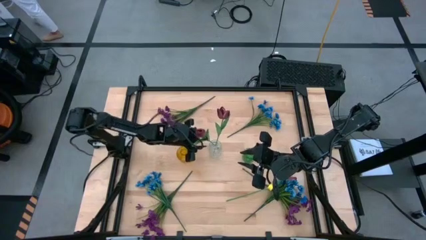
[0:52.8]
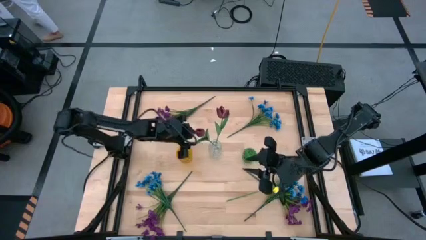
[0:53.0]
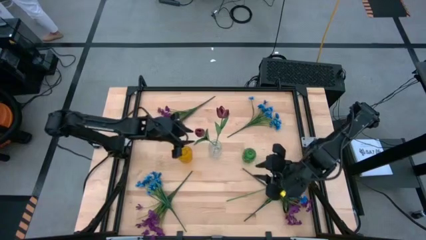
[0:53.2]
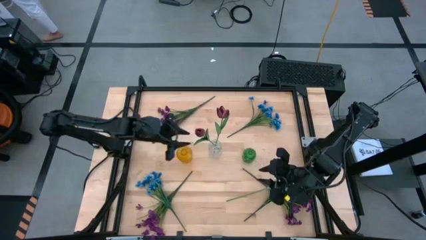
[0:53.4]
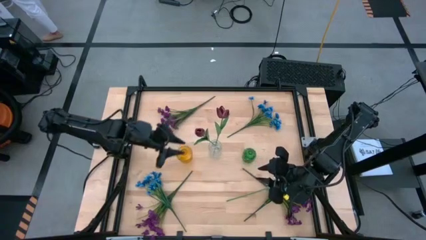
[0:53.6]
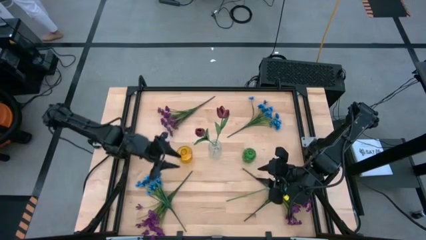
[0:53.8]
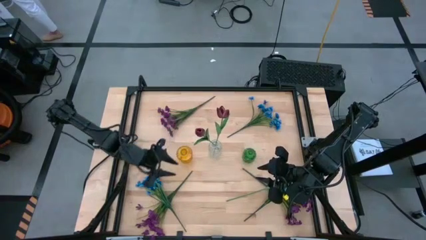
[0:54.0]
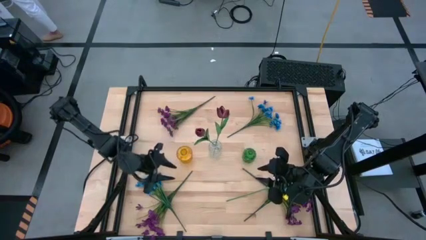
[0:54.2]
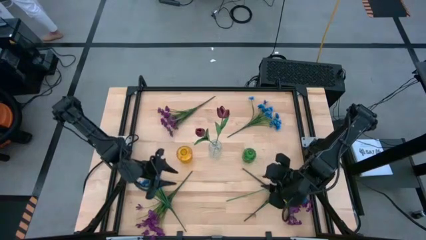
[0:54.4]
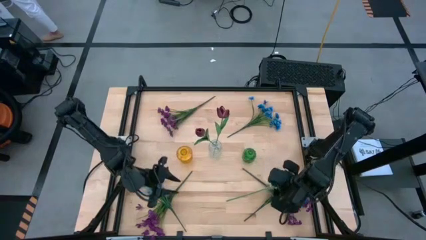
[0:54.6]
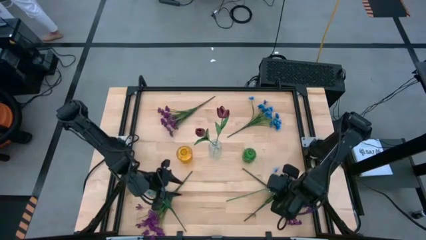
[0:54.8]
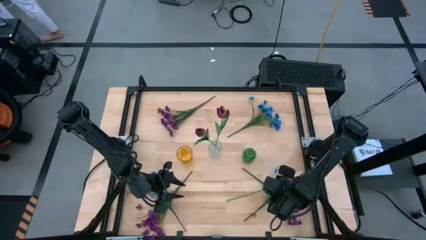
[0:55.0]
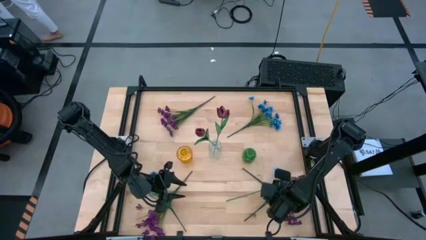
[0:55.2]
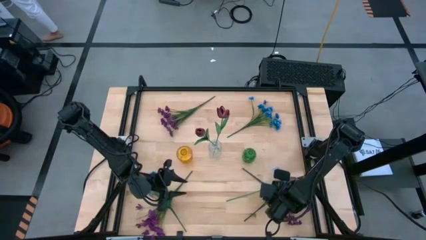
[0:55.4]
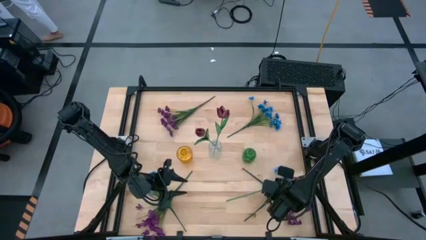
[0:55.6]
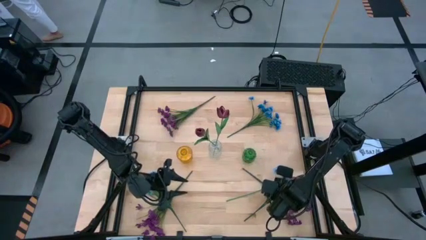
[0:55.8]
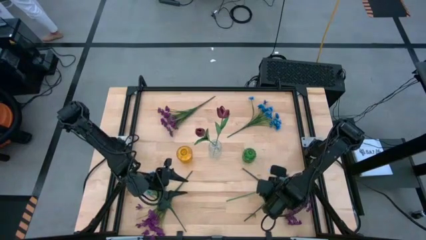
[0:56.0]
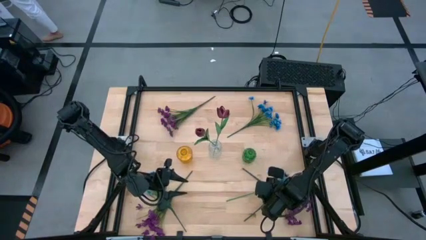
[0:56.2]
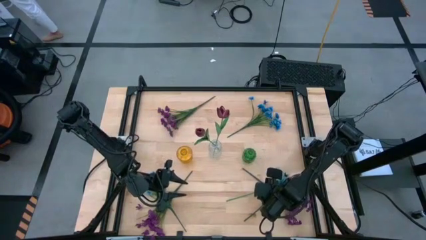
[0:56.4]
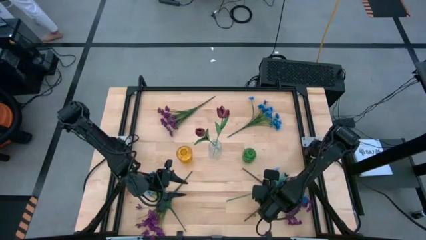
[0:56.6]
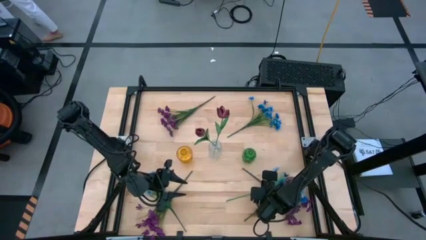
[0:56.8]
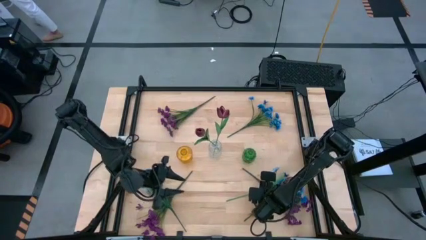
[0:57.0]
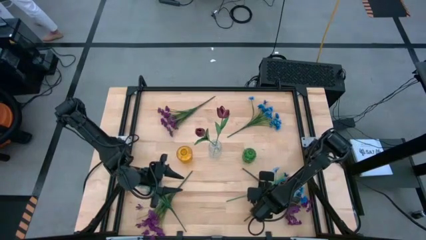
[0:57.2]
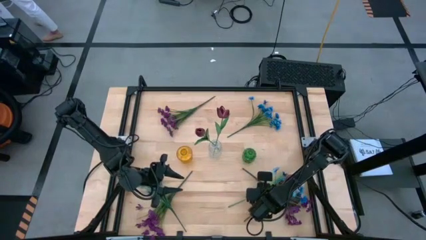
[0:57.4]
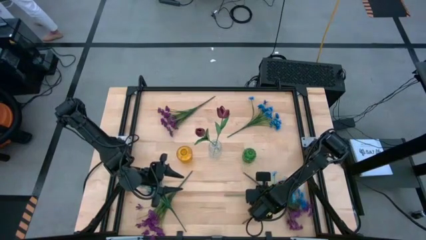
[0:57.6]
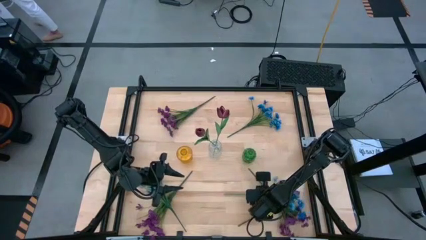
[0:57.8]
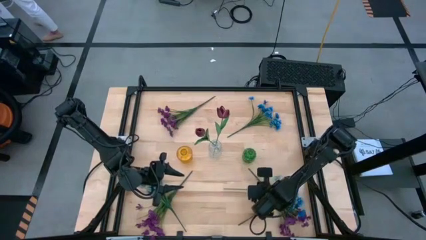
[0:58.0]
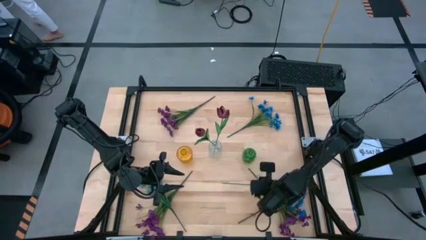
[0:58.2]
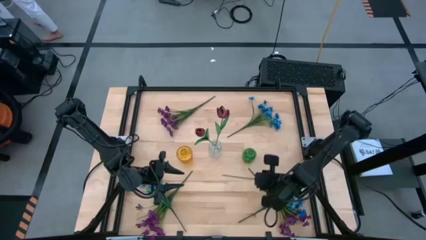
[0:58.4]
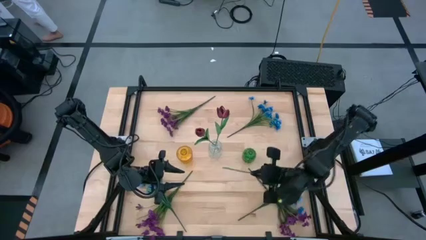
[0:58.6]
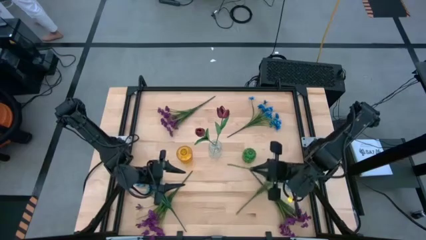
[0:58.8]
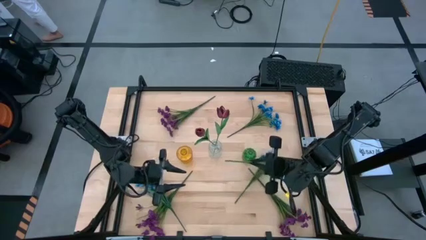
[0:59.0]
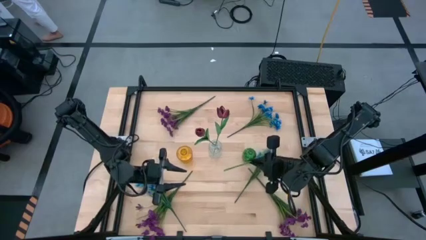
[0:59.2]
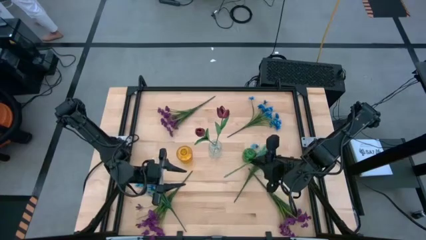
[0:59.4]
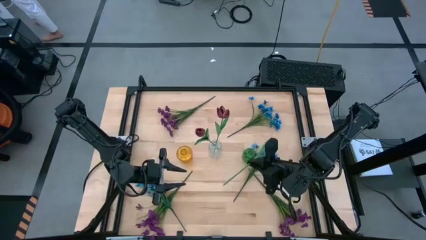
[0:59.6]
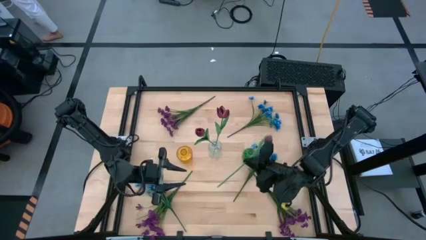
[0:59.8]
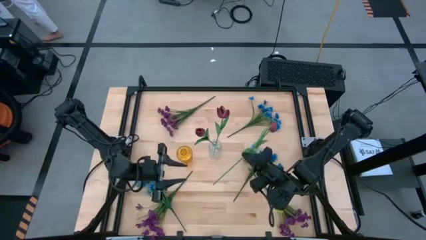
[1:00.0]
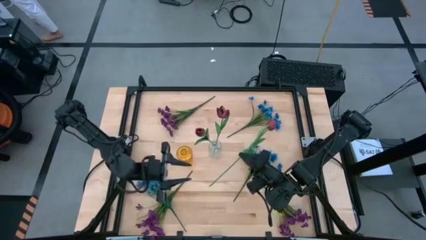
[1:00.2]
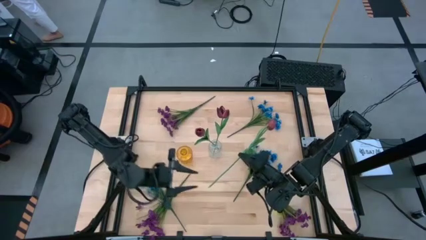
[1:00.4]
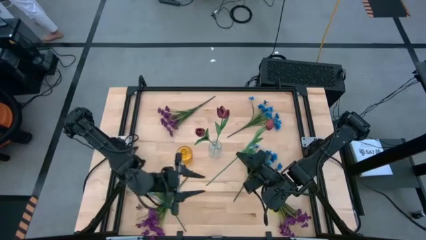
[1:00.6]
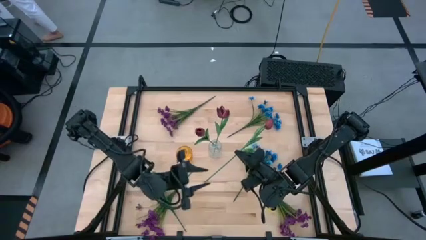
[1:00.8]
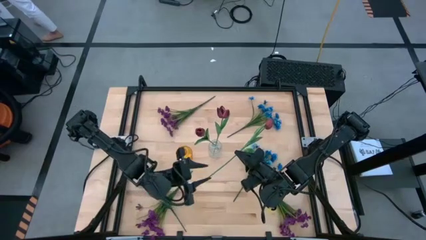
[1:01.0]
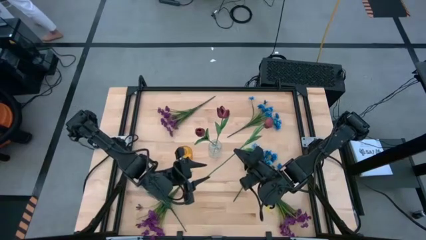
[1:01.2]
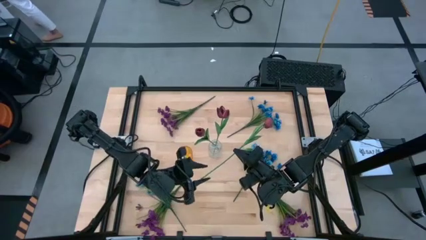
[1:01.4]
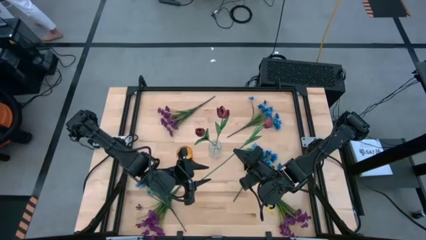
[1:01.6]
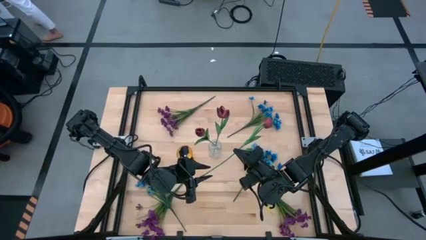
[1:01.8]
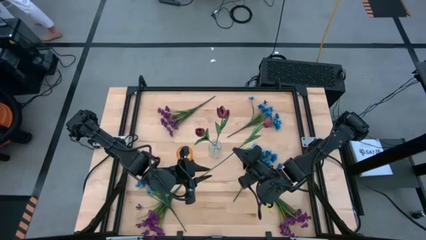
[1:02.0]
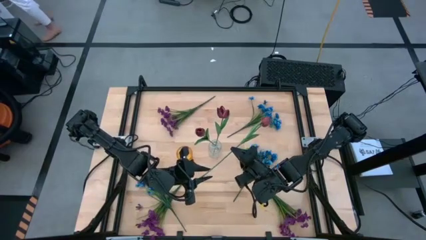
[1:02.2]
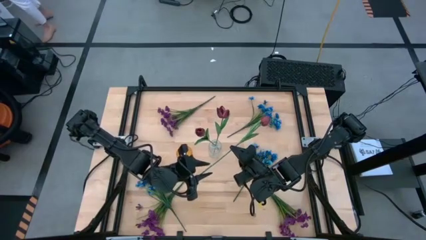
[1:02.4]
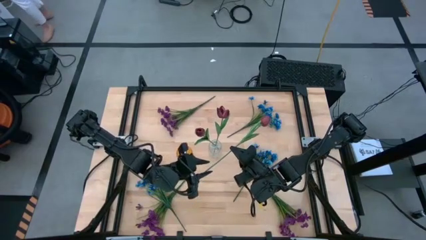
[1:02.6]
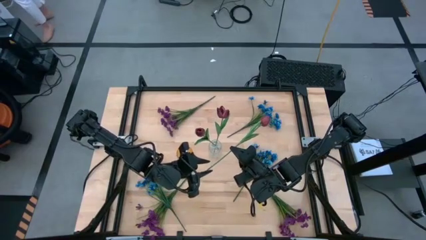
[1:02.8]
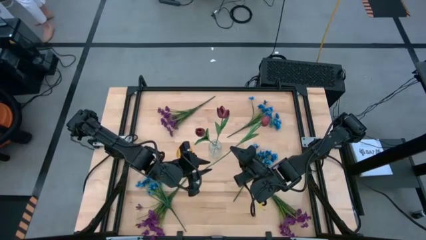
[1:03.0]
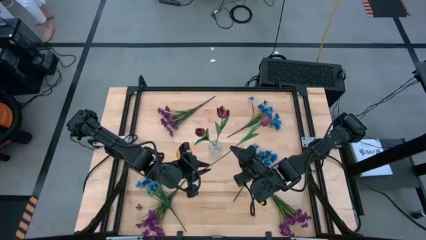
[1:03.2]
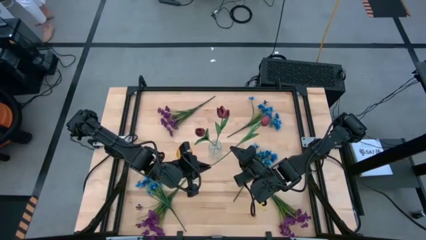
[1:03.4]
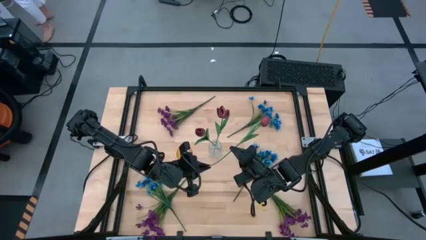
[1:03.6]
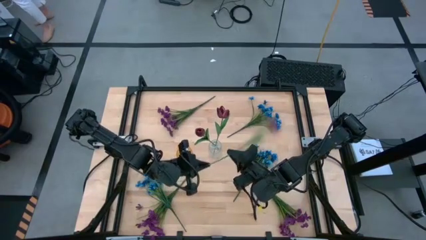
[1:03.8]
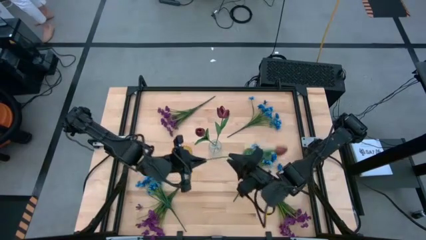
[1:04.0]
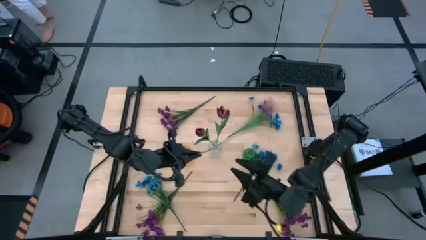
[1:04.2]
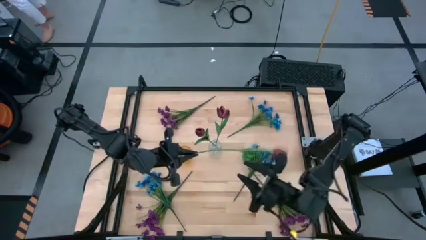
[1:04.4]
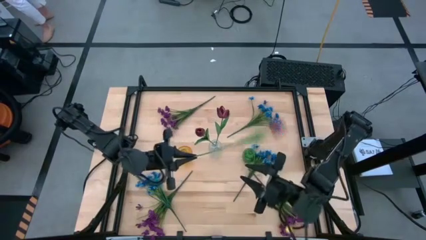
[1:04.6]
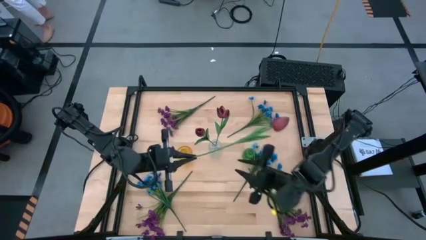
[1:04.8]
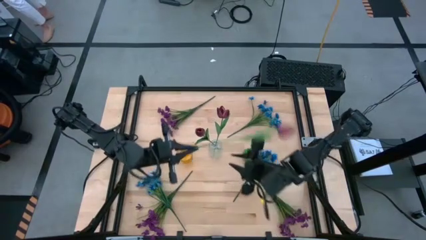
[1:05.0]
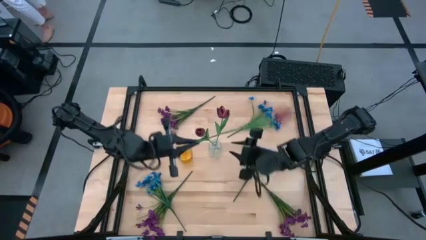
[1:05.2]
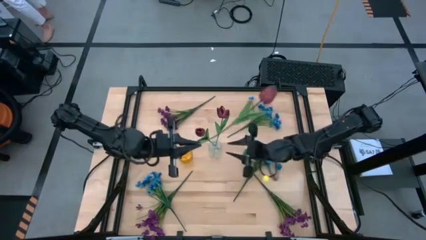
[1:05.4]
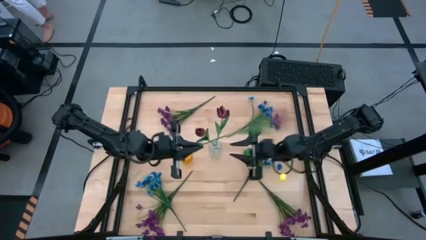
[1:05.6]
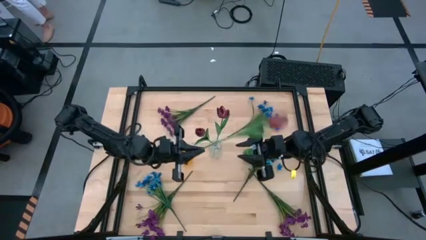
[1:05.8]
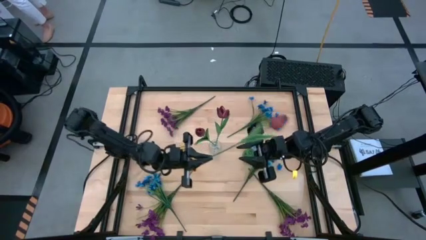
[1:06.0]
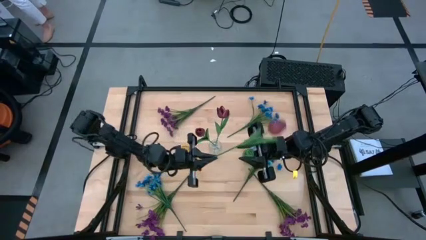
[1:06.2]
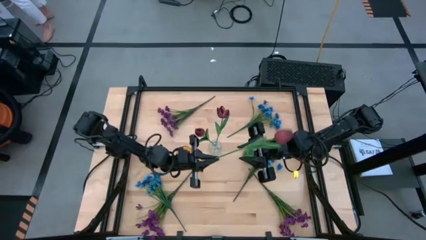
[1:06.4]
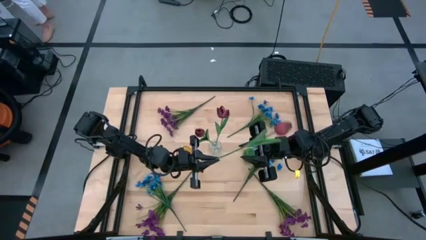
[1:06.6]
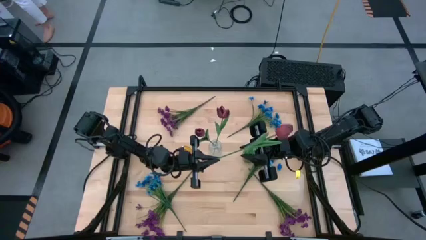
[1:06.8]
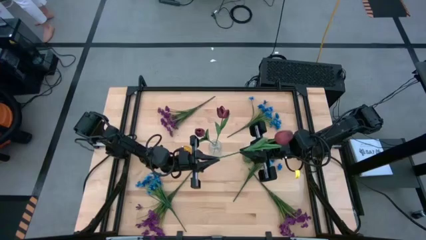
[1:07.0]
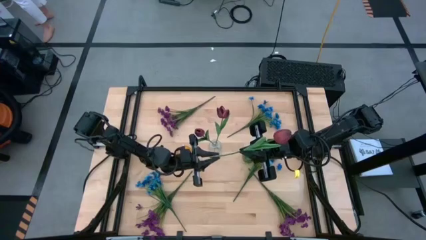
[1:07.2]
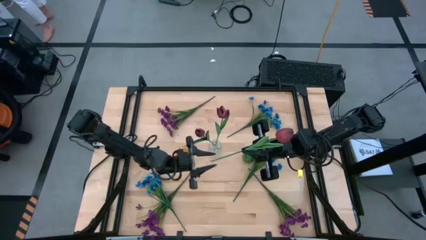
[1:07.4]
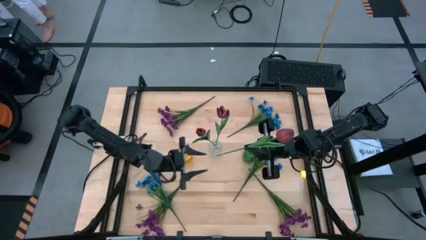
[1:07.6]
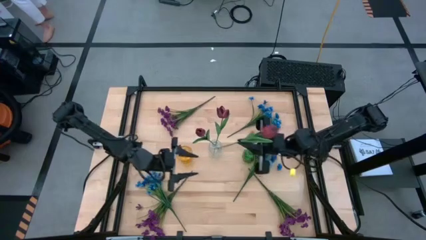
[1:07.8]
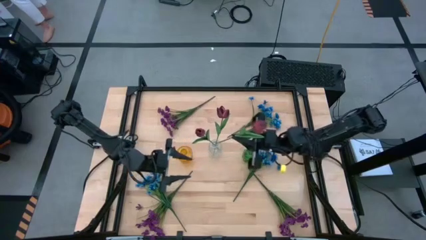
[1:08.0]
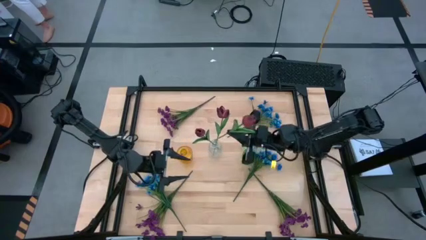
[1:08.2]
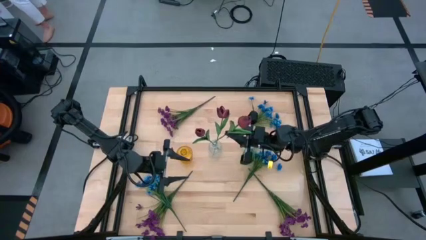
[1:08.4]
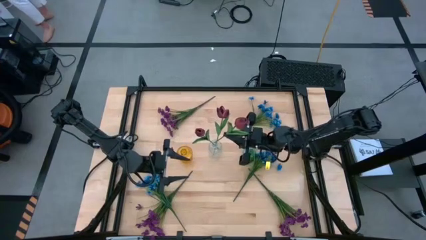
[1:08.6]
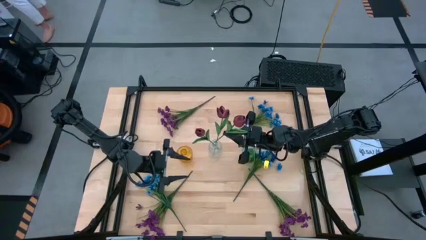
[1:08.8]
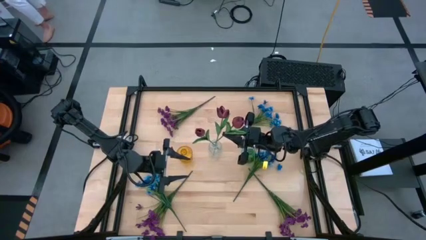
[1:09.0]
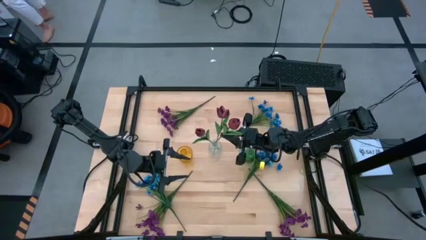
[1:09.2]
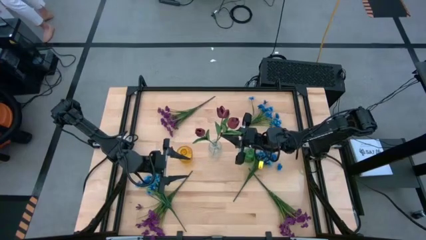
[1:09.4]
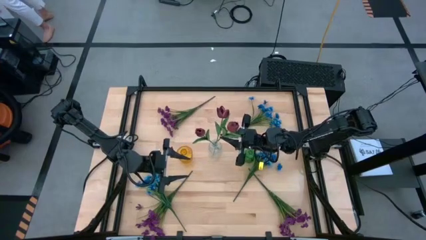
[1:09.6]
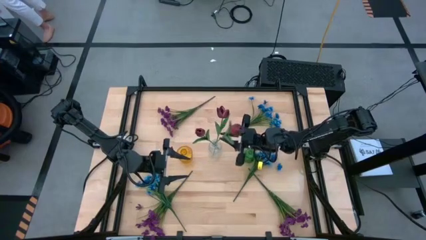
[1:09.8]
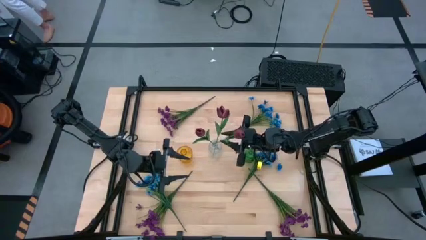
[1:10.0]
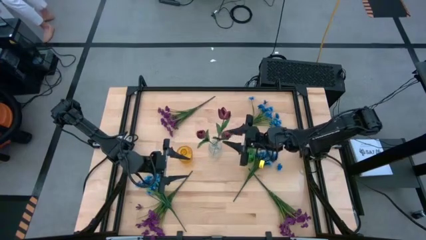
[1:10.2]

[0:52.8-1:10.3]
Task: Sort flowers into vase by color
Put the red tulip into the transparent vase
